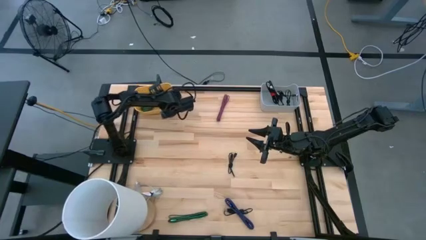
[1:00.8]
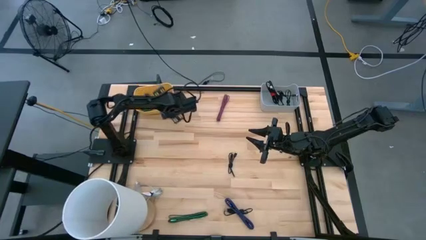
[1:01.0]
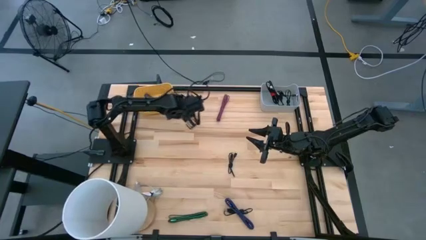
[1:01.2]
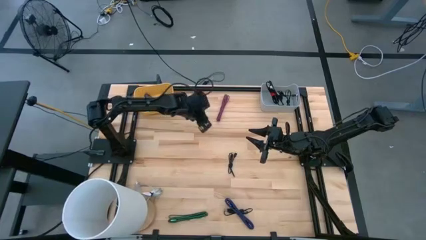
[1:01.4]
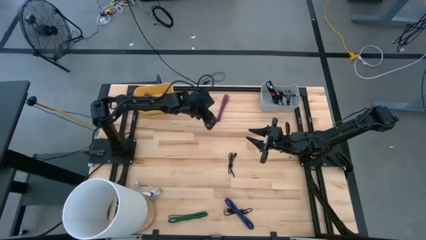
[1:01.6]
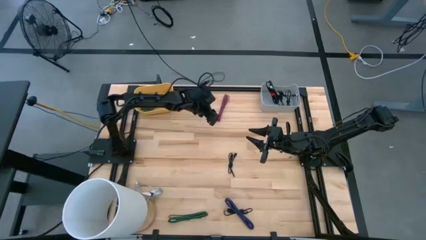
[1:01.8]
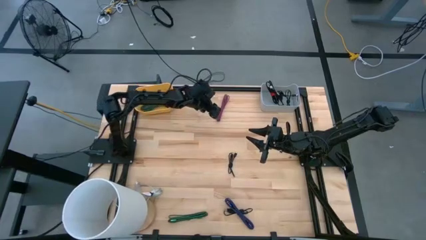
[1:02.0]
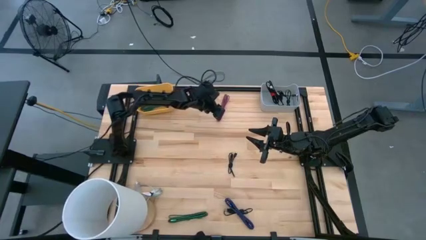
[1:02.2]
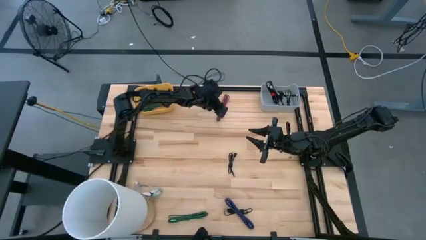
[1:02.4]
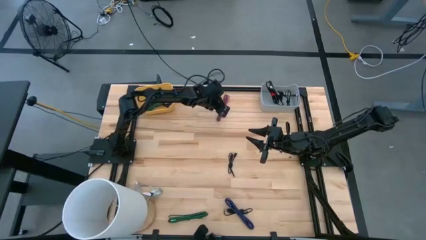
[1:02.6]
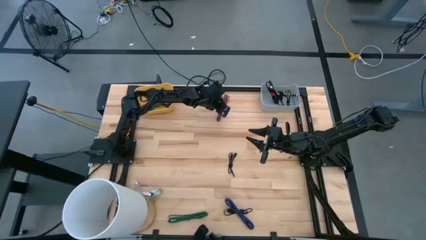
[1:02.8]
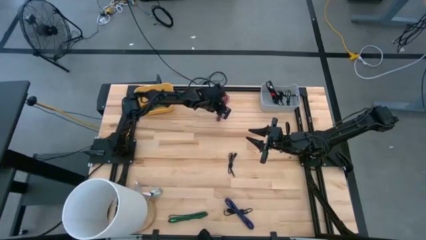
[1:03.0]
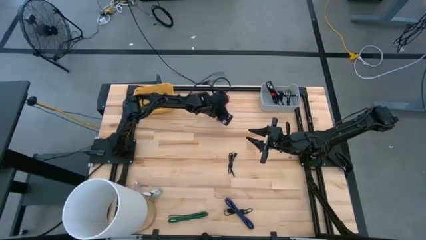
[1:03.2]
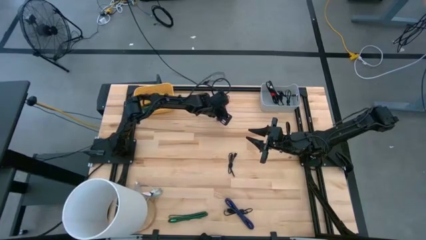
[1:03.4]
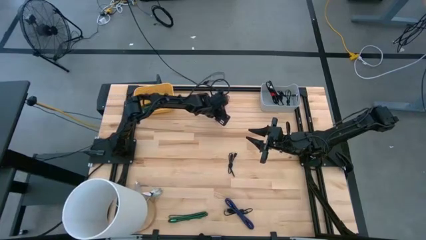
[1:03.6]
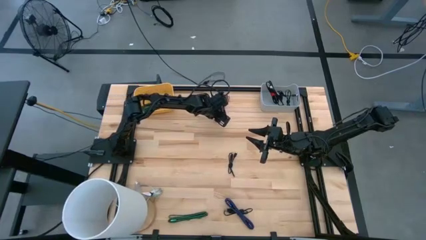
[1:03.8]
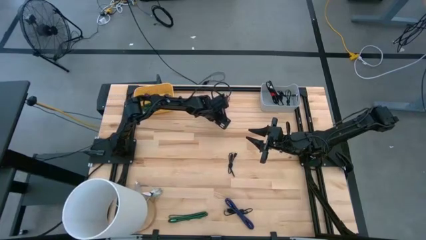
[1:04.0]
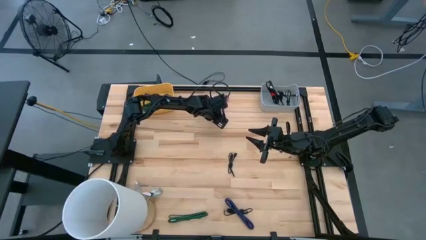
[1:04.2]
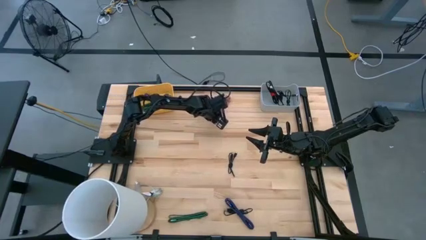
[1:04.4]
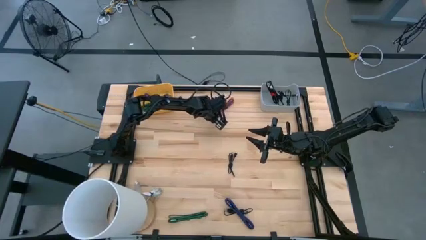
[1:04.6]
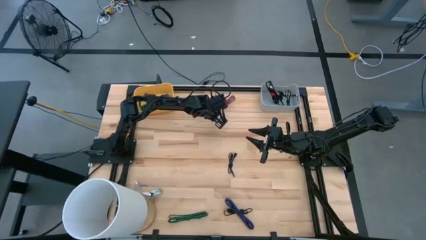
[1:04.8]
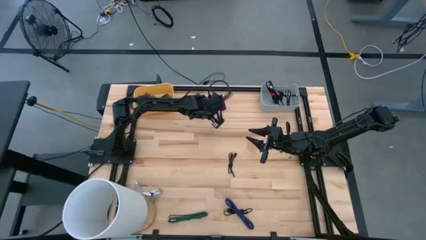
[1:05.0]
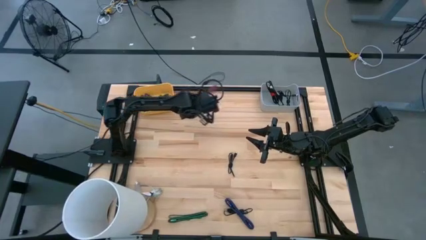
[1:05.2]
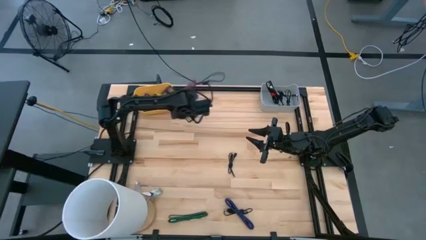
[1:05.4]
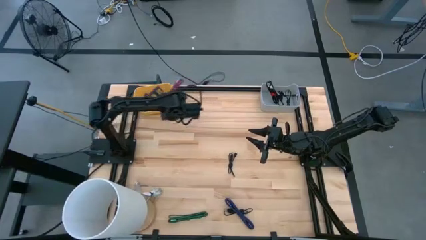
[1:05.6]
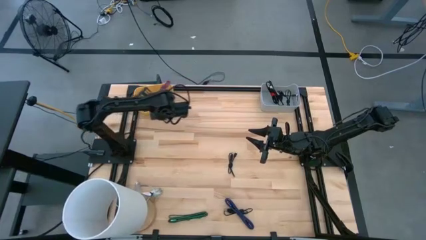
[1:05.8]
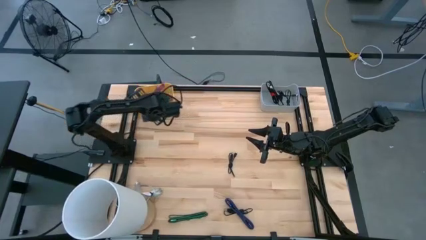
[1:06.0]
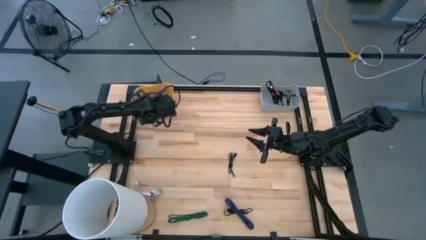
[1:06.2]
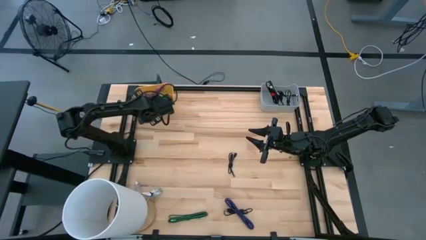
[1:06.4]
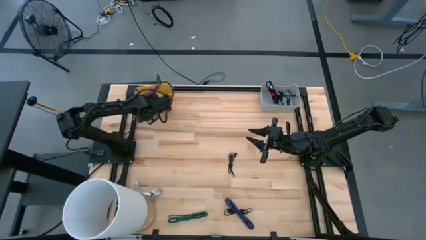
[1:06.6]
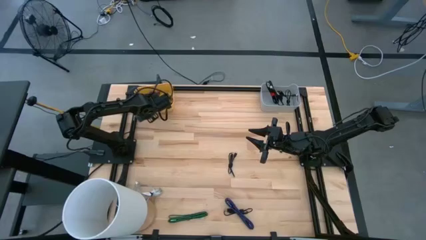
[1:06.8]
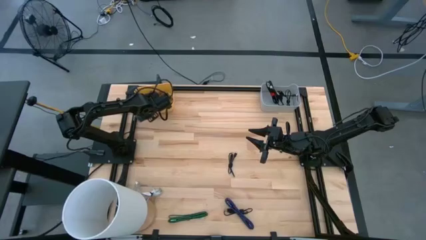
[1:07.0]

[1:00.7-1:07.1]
Task: Pick & Place USB Port
Put the pink charger cable into the yellow bin

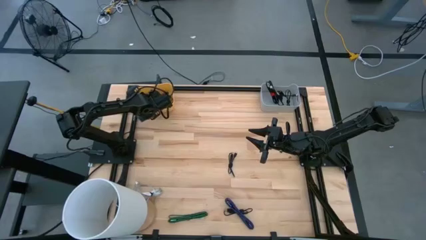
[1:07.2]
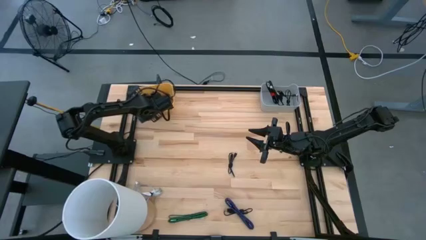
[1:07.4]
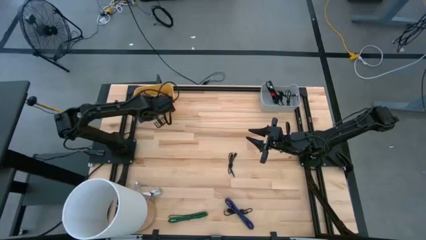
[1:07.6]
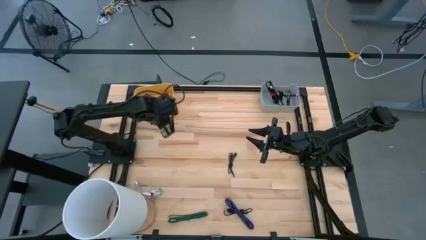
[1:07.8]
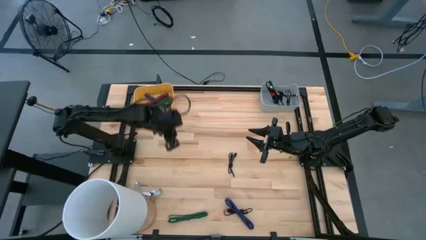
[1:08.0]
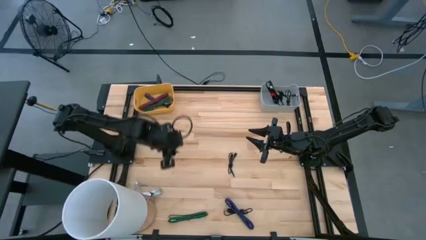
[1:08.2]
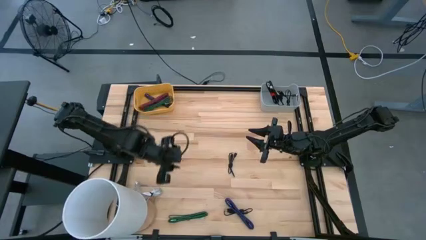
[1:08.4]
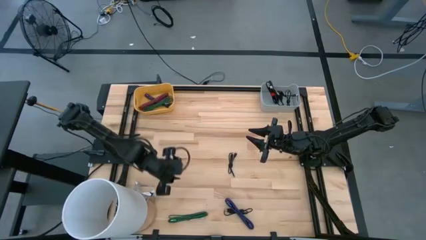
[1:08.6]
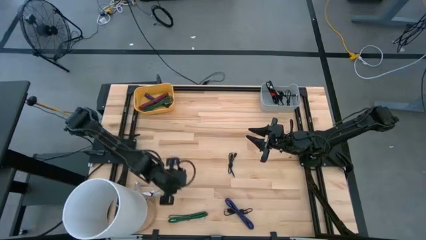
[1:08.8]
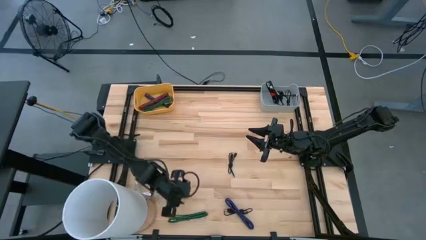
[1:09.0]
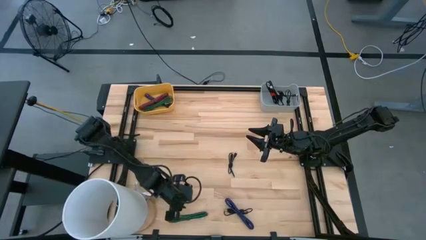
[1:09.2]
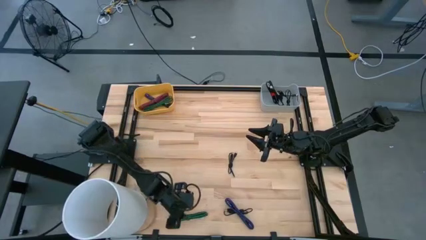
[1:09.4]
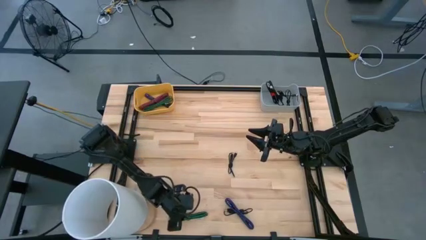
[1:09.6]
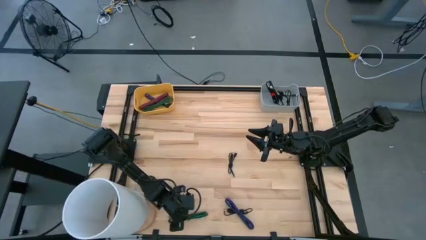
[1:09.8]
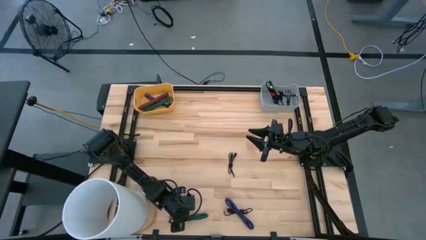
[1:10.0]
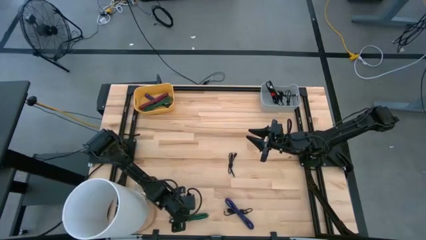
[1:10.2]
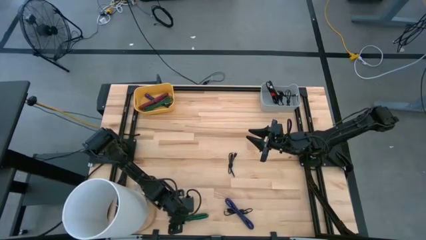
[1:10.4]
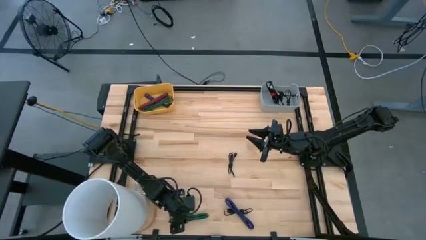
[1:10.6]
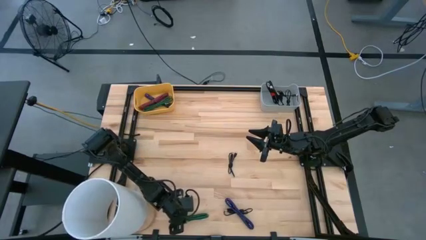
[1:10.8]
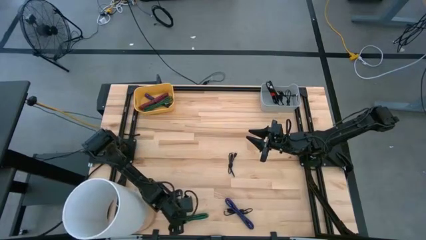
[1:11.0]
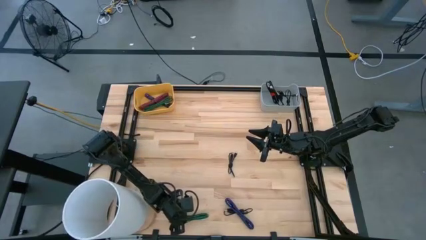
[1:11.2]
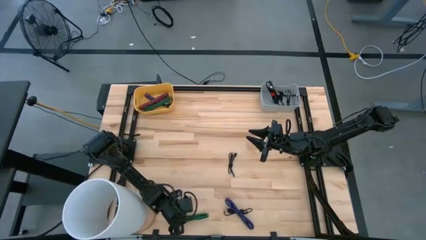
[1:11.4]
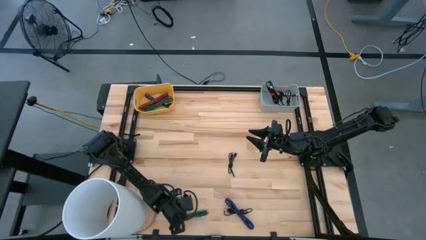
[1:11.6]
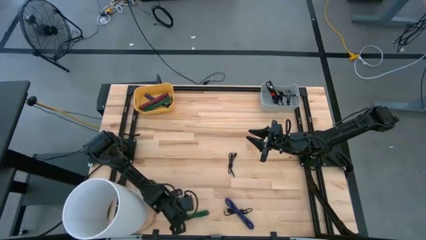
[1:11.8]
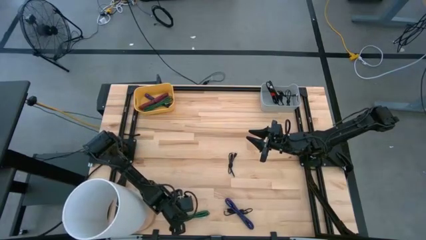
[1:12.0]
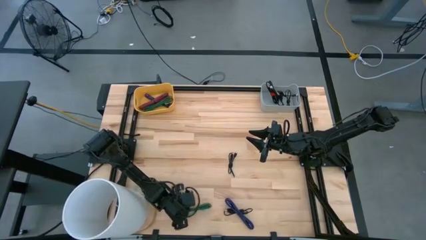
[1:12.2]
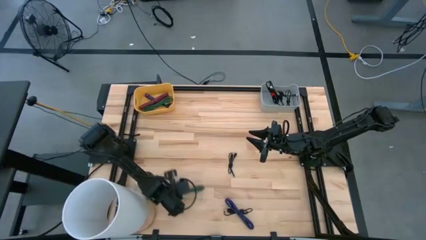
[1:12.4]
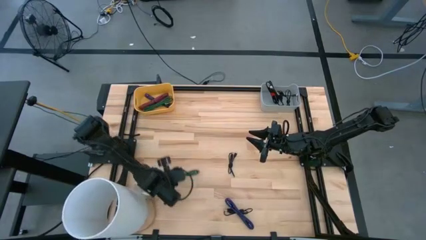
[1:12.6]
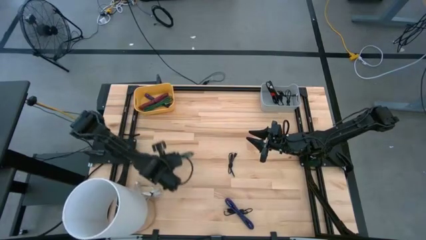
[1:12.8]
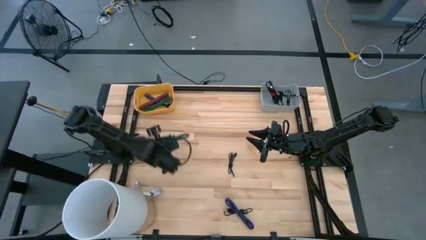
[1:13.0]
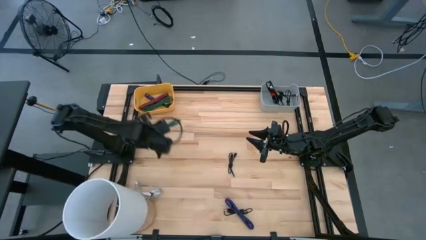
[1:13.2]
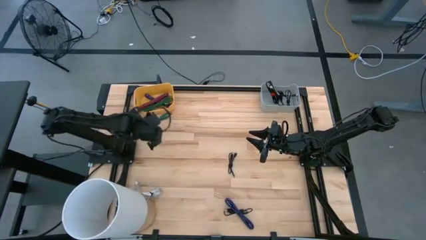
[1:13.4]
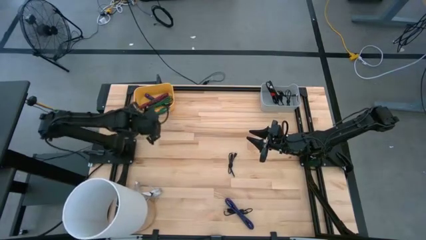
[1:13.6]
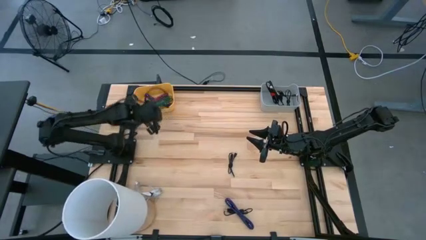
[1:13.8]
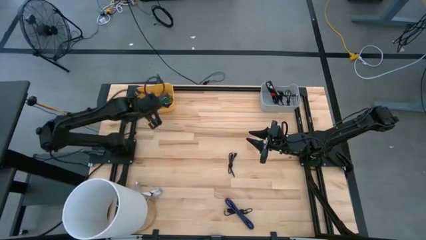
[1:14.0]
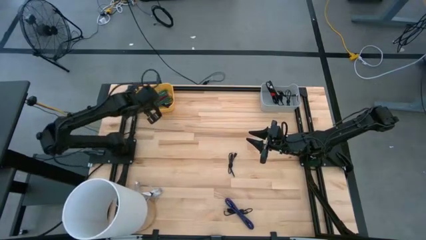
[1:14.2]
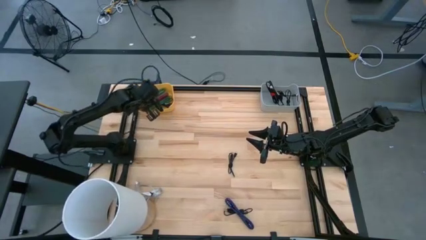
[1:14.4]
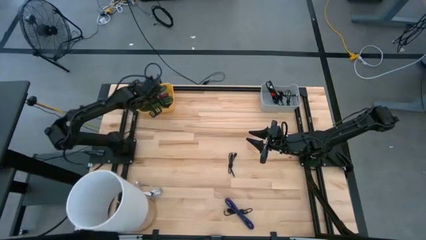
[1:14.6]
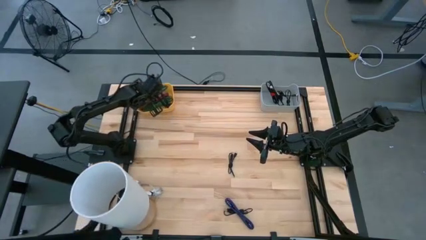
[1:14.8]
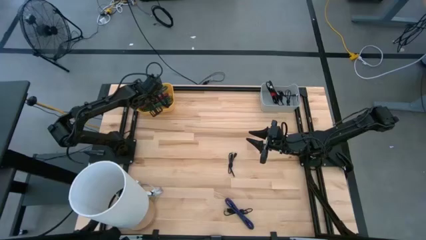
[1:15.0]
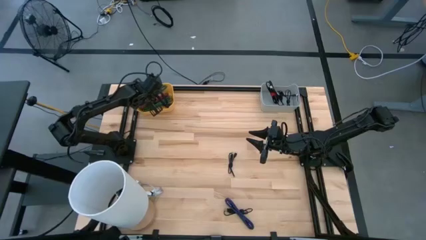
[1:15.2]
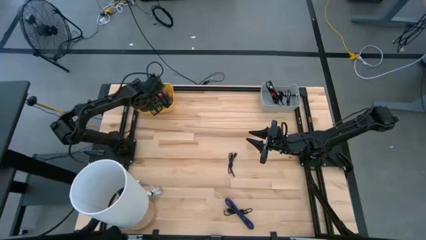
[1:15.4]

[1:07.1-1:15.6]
Put the green charger cable into the yellow bin
